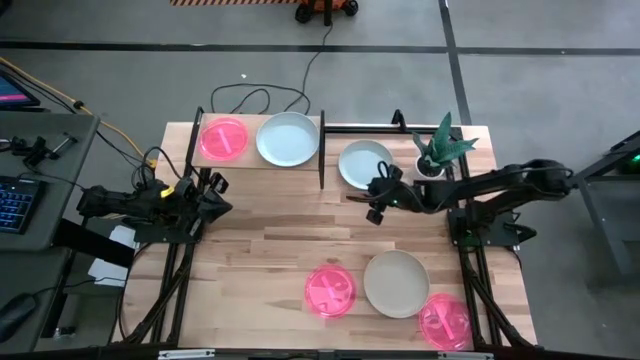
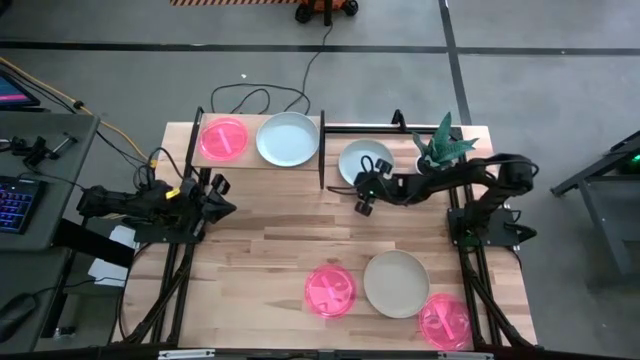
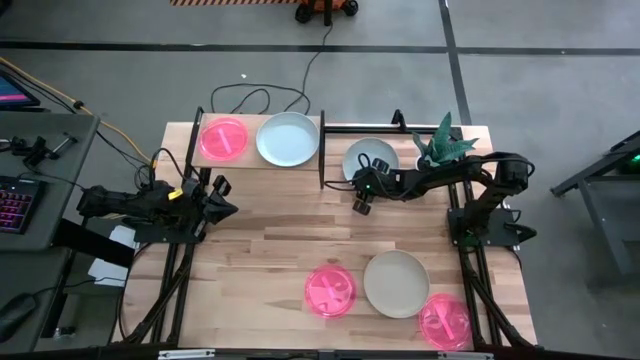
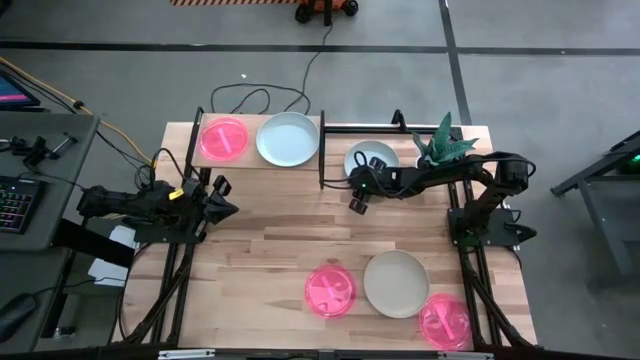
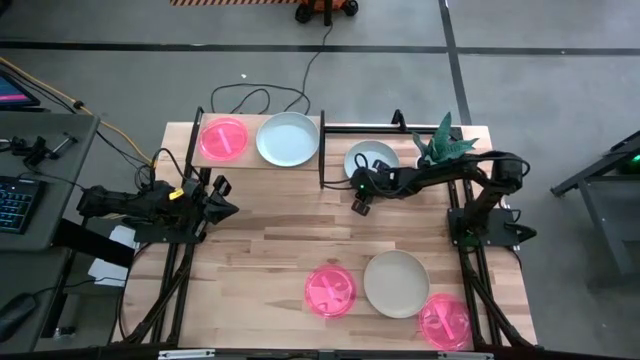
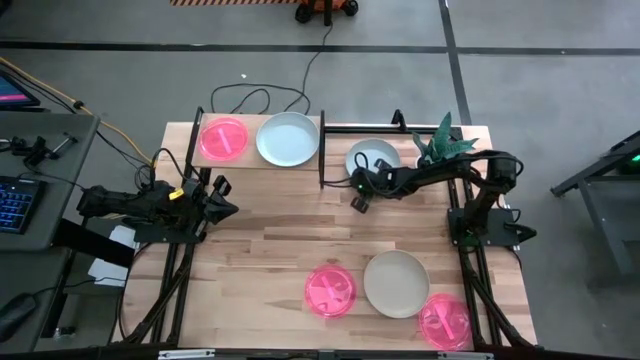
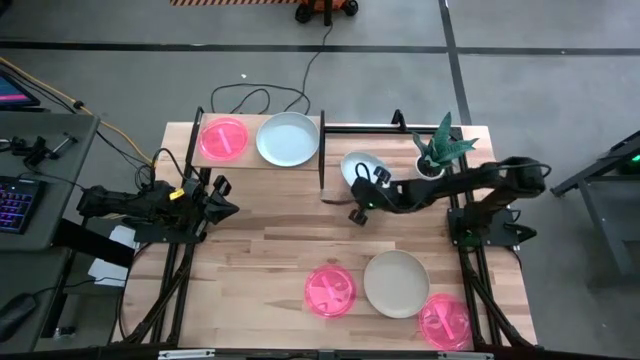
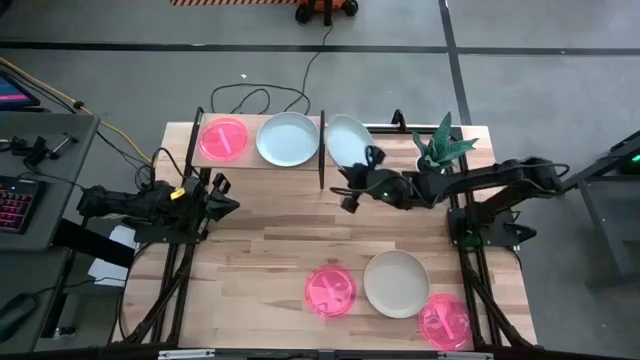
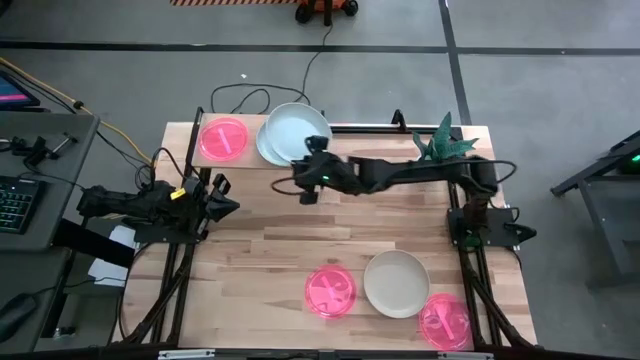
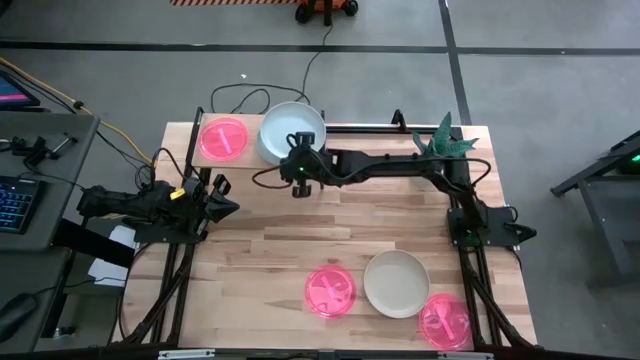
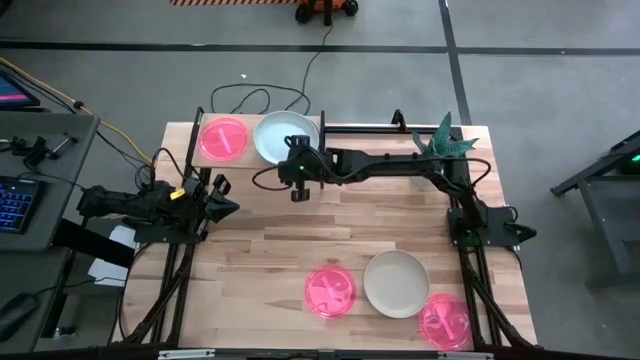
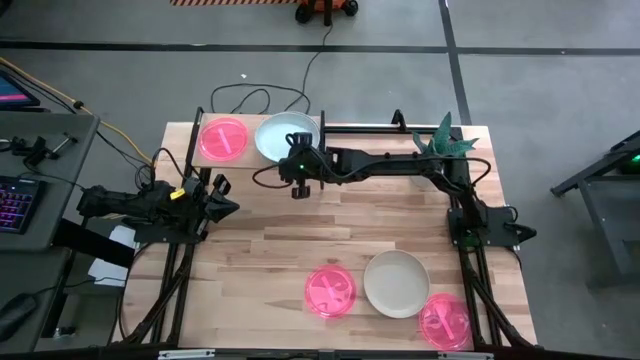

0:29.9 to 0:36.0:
Task: Place and stack plates onto a shelf
Stack the white plate on top of the white plate on the shelf

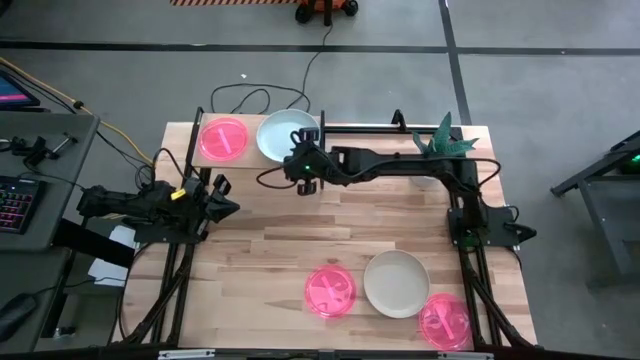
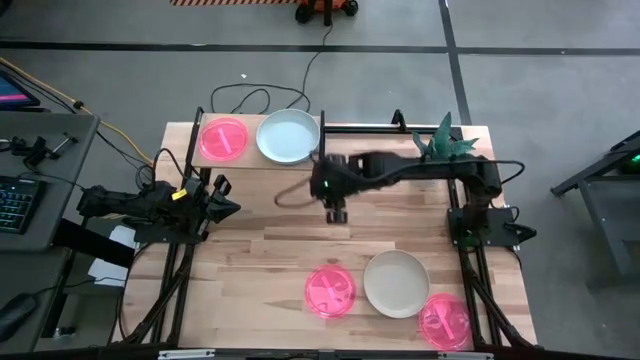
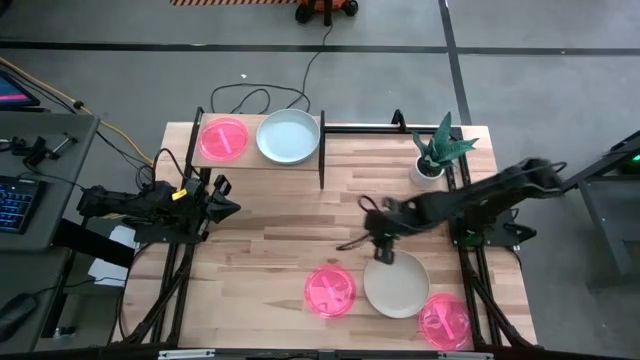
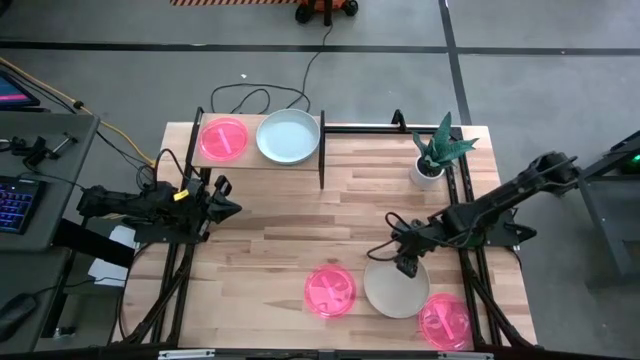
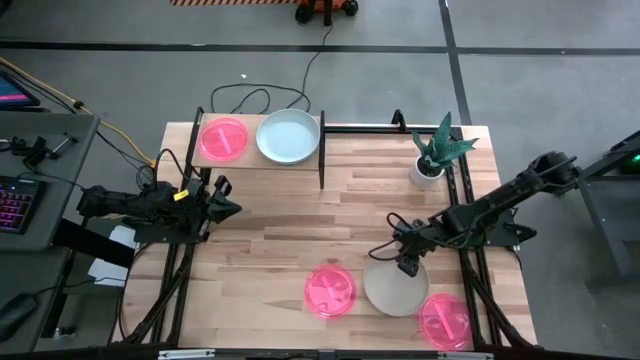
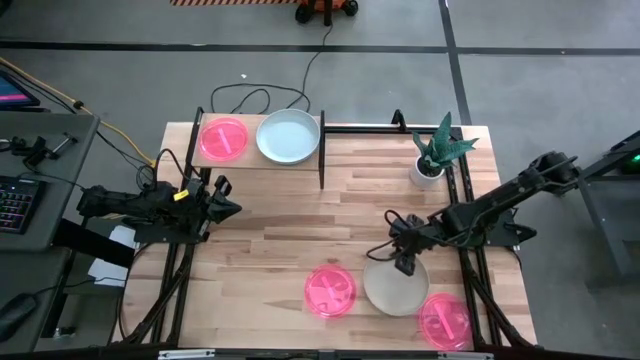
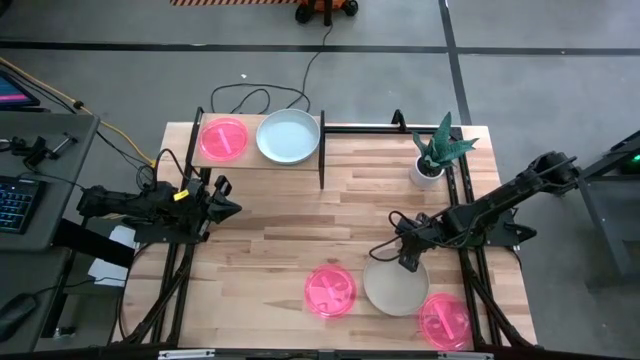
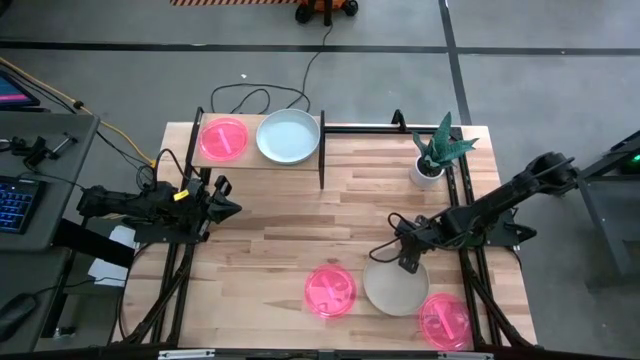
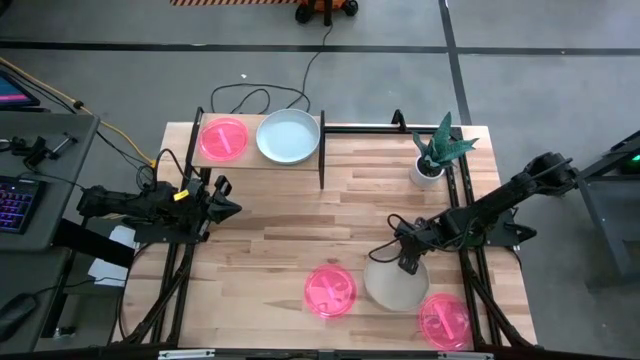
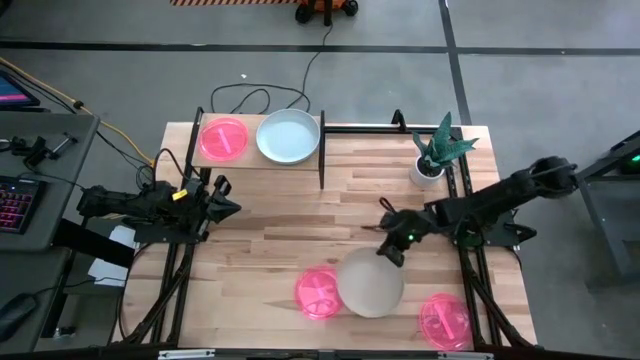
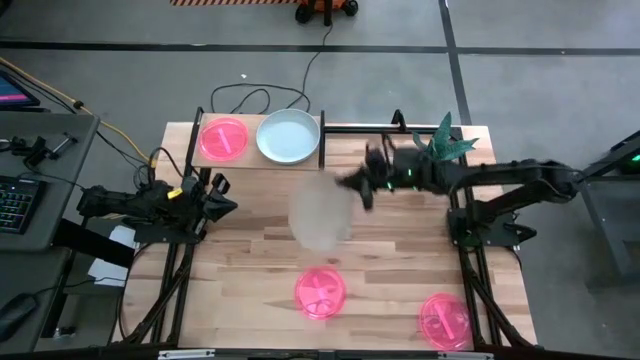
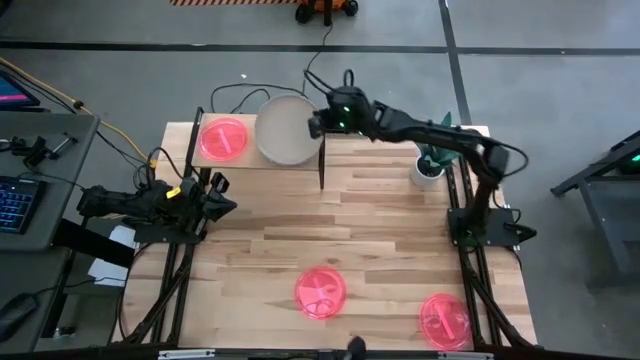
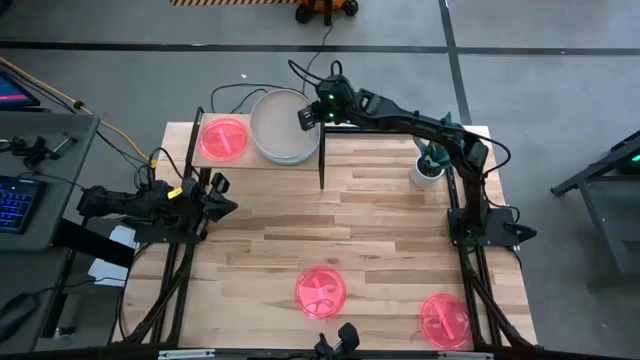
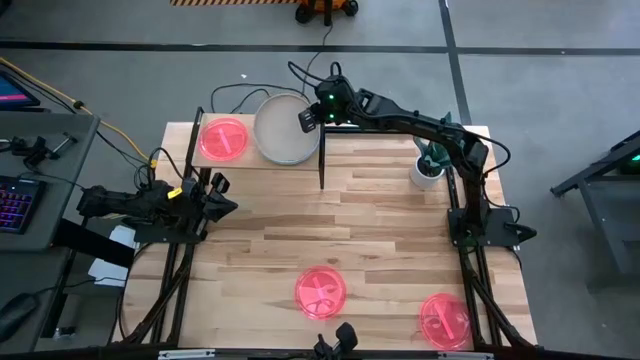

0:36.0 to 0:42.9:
Stack the brown plate on top of the white plate on the shelf

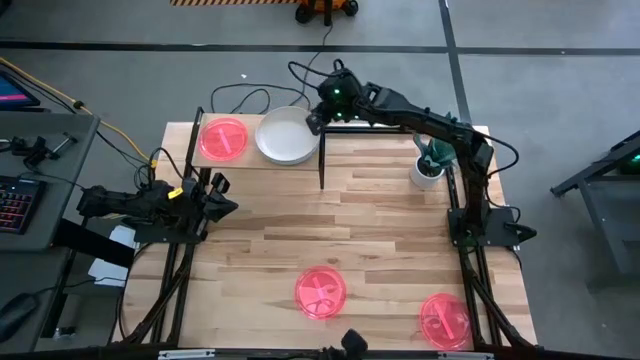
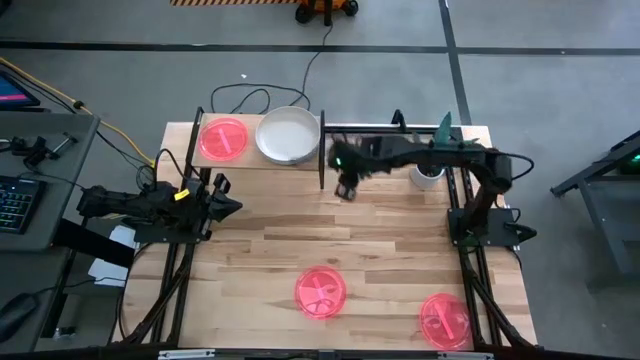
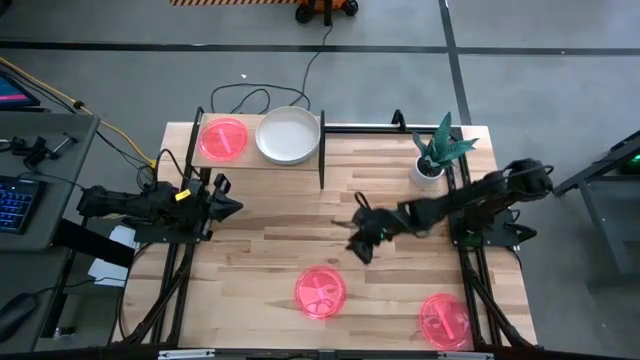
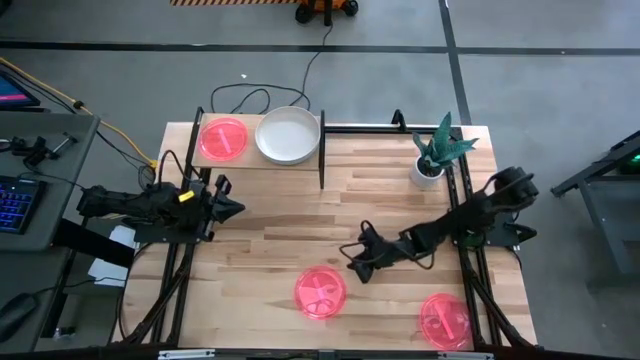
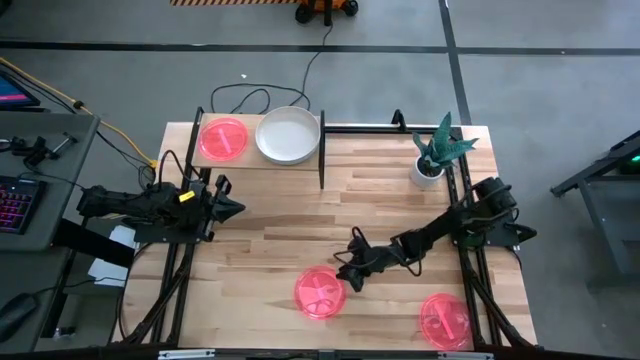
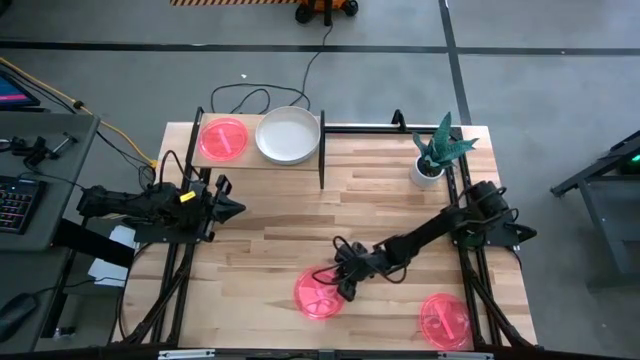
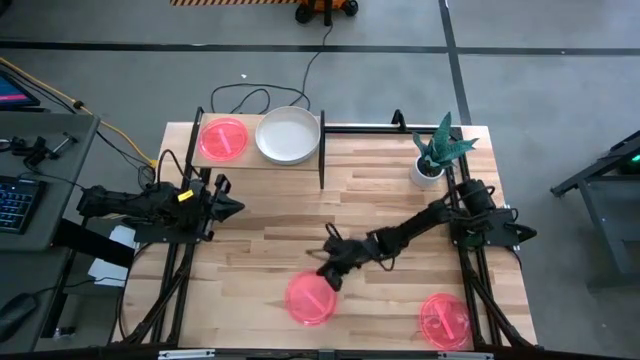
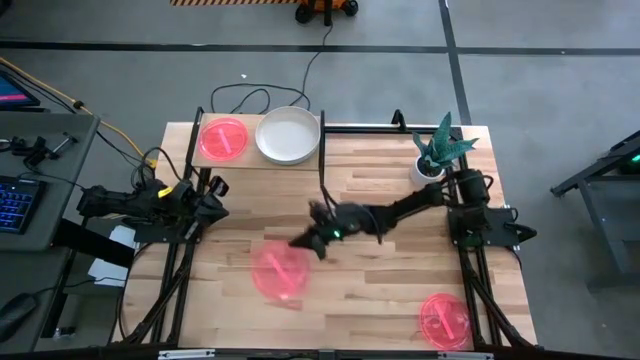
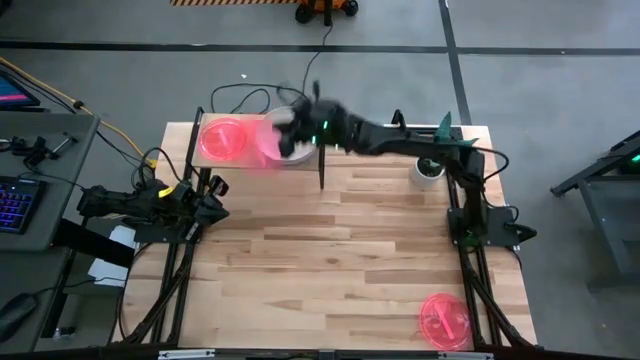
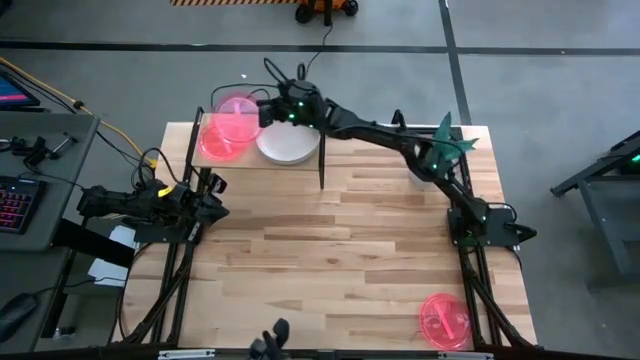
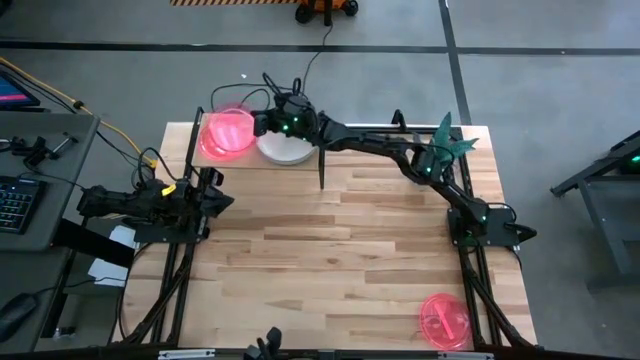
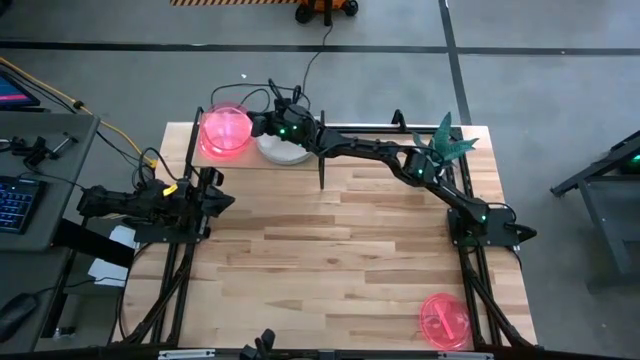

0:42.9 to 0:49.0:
Stack the bottom transparent pink plate on top of the pink transparent plate on the shelf

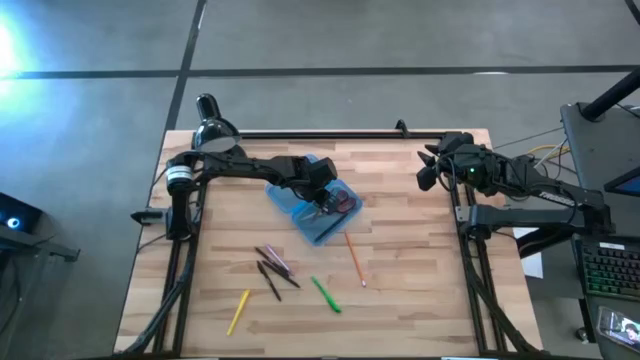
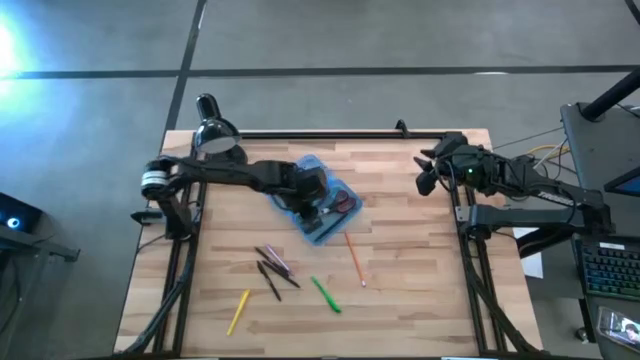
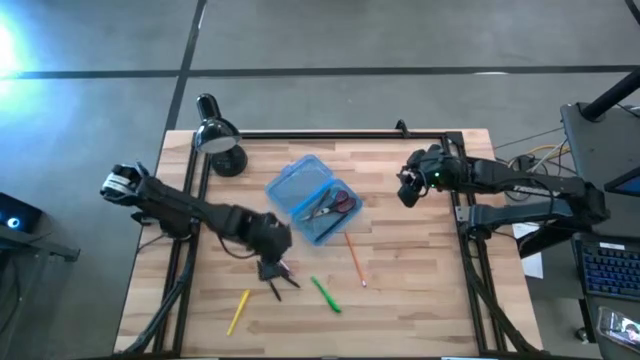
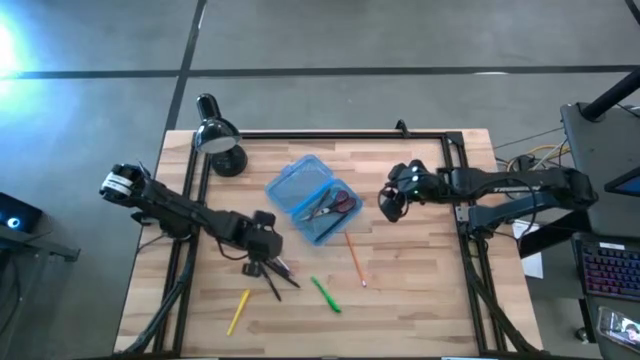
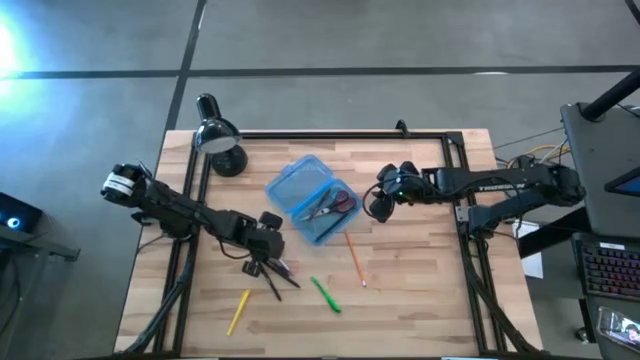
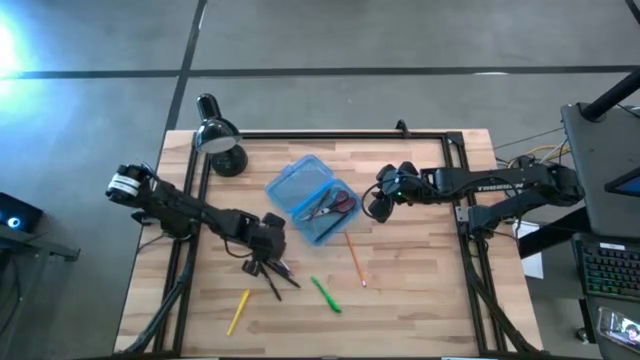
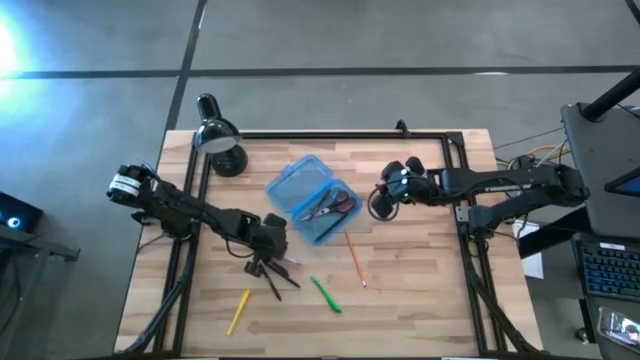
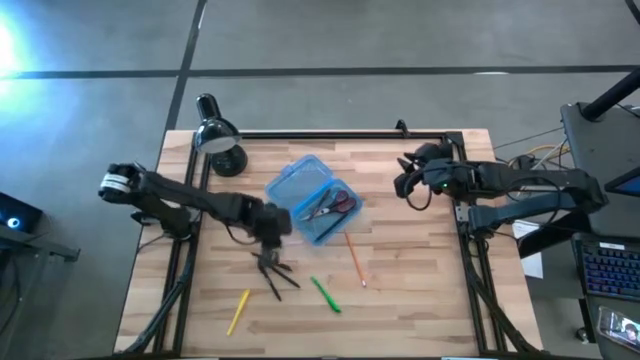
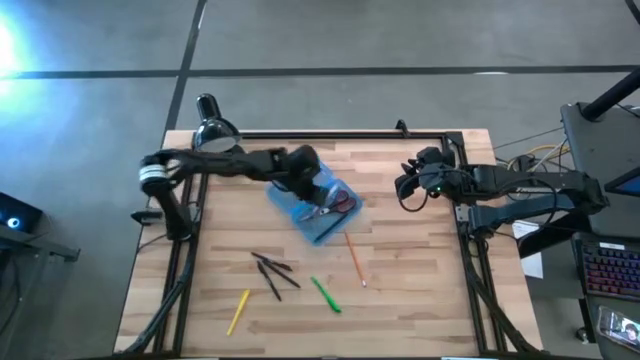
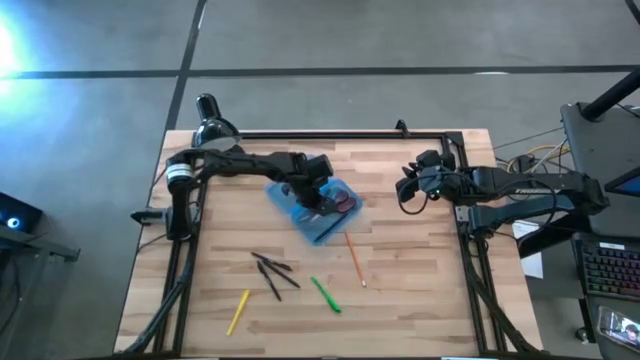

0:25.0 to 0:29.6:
Task: Pick & place school supplies into a supply box
Put the purple pen into the supply box
